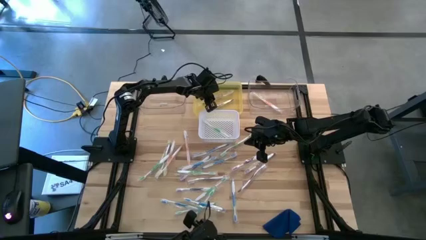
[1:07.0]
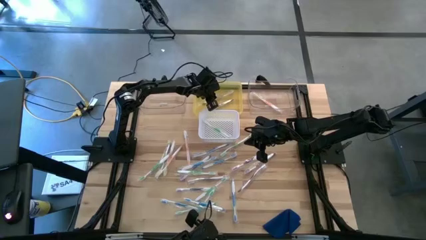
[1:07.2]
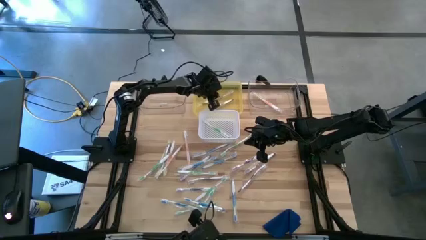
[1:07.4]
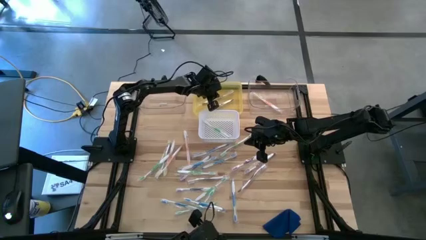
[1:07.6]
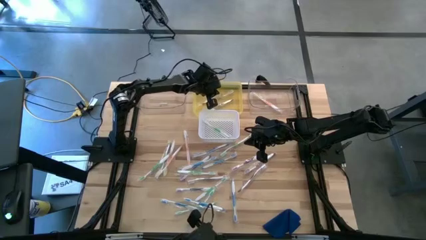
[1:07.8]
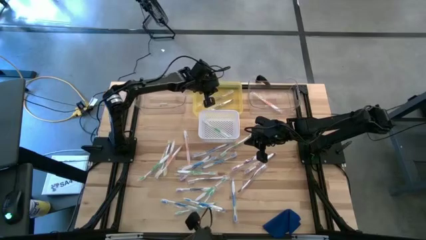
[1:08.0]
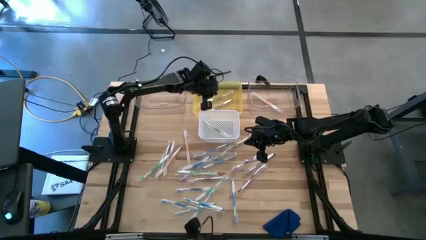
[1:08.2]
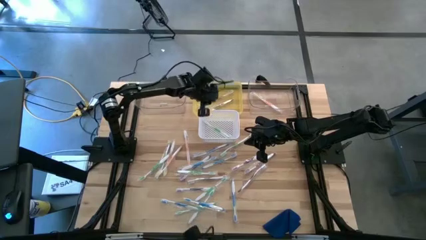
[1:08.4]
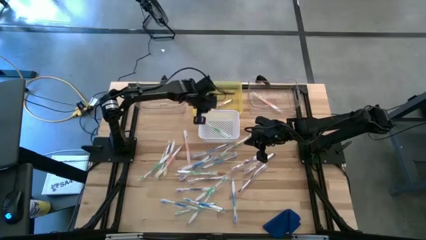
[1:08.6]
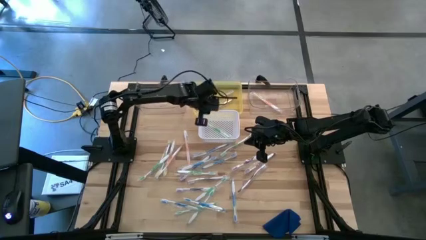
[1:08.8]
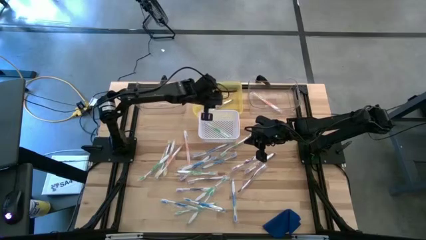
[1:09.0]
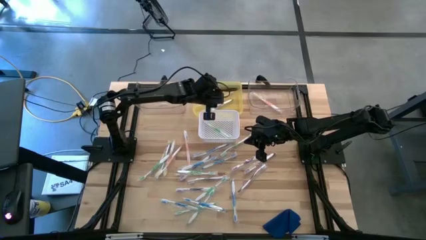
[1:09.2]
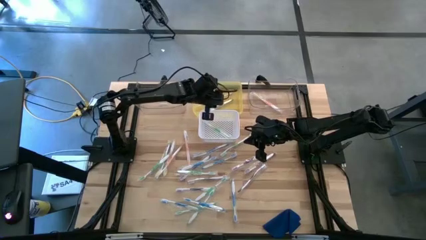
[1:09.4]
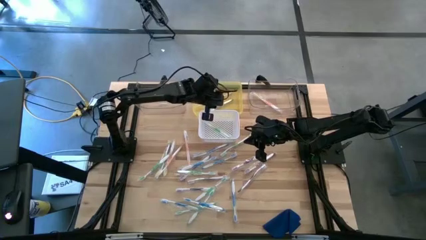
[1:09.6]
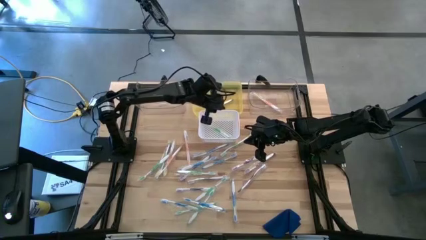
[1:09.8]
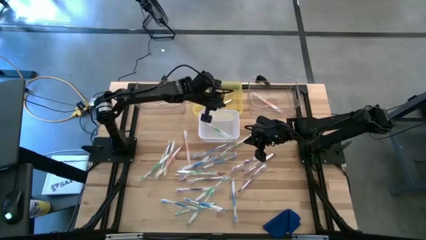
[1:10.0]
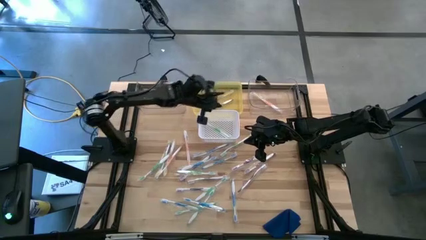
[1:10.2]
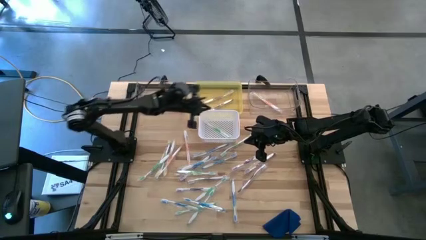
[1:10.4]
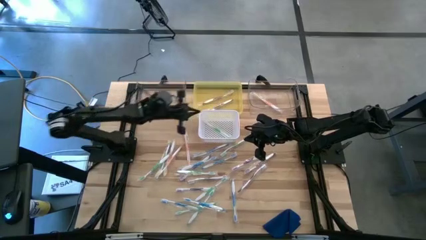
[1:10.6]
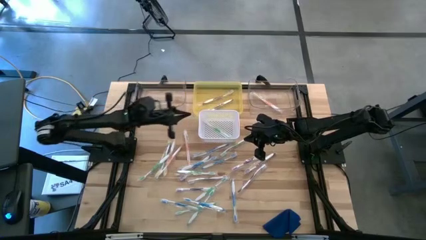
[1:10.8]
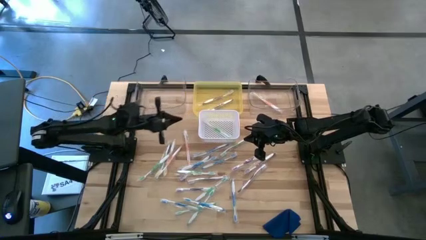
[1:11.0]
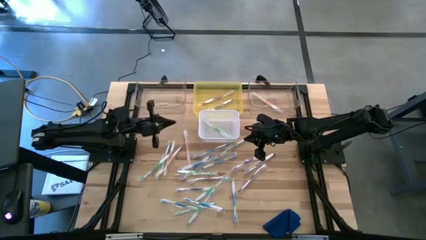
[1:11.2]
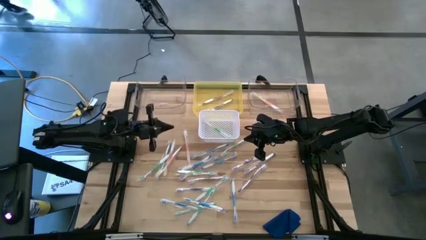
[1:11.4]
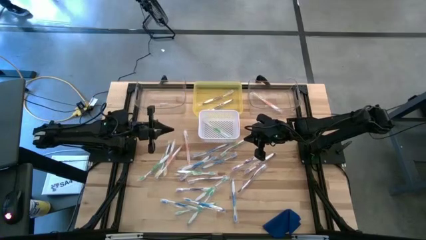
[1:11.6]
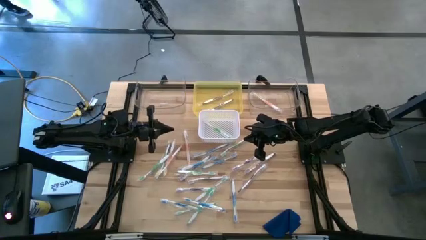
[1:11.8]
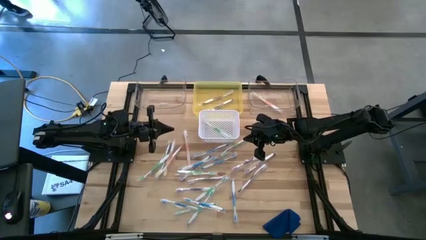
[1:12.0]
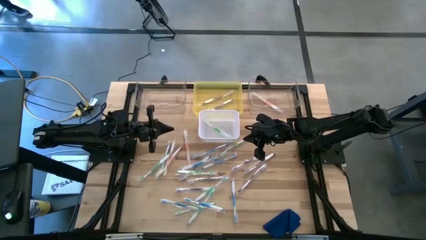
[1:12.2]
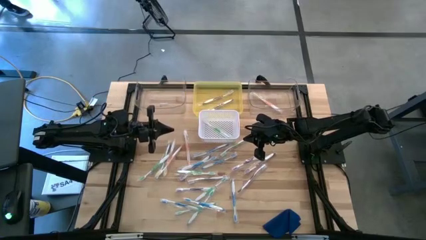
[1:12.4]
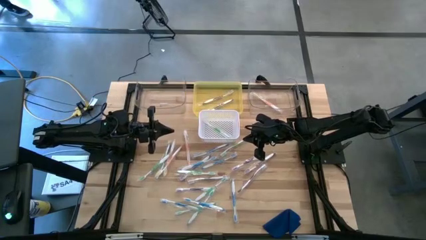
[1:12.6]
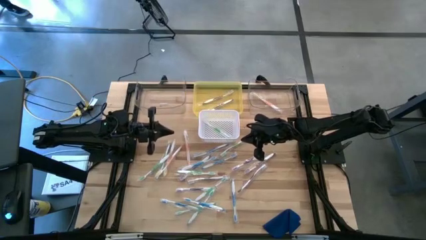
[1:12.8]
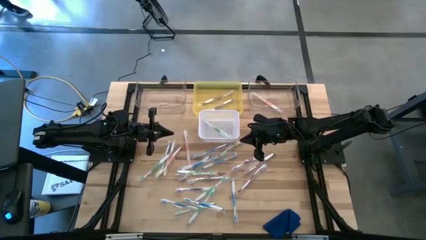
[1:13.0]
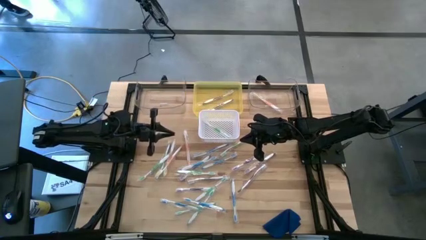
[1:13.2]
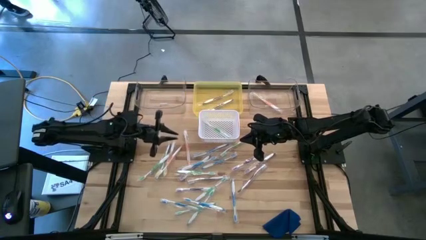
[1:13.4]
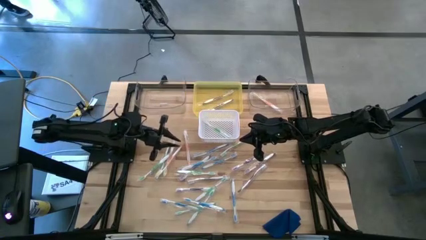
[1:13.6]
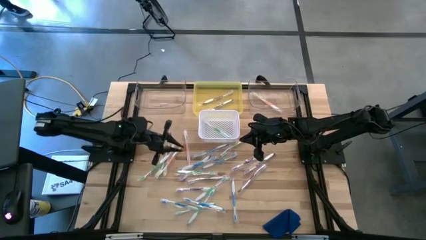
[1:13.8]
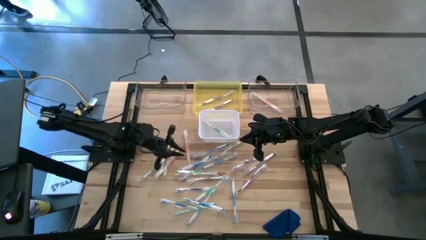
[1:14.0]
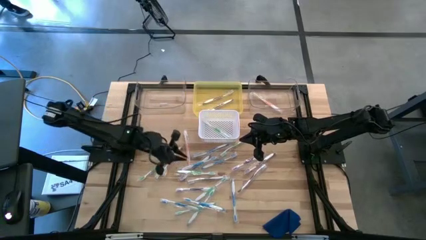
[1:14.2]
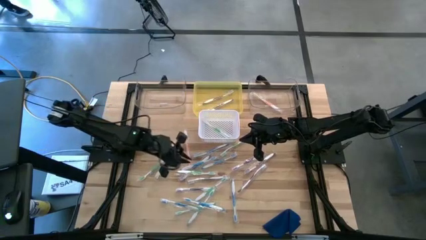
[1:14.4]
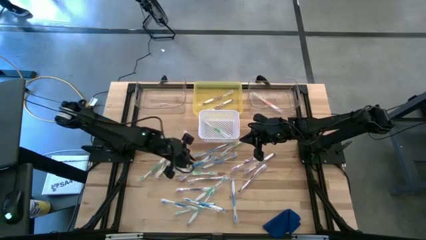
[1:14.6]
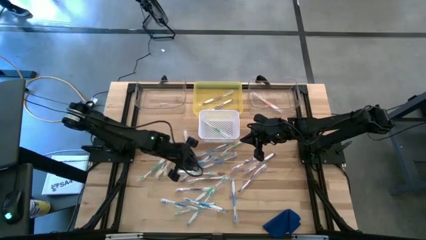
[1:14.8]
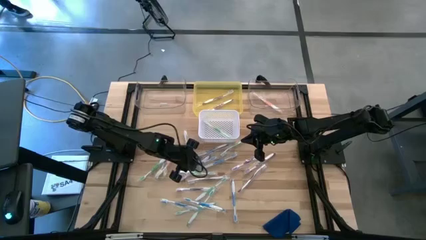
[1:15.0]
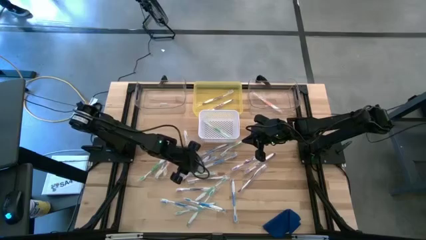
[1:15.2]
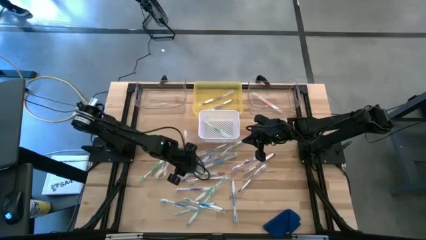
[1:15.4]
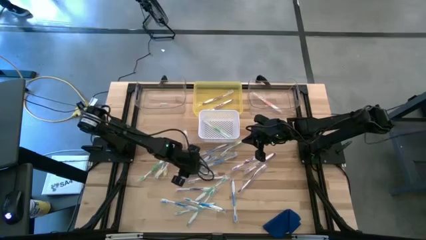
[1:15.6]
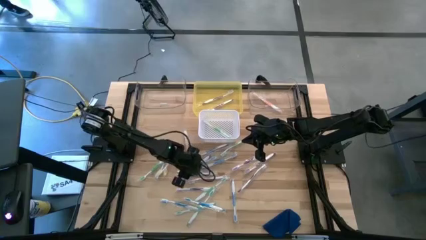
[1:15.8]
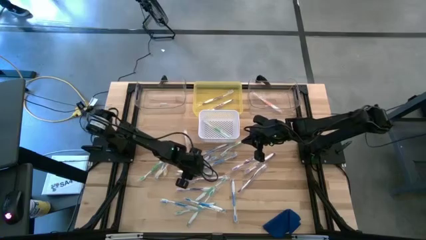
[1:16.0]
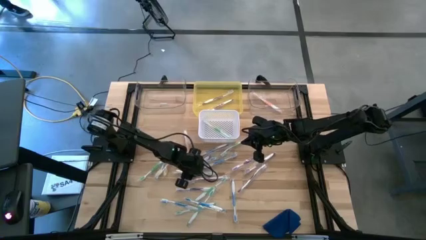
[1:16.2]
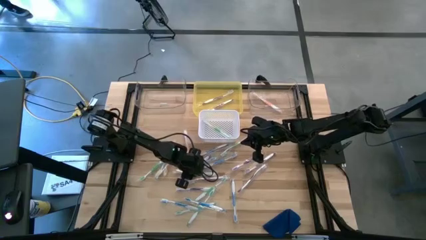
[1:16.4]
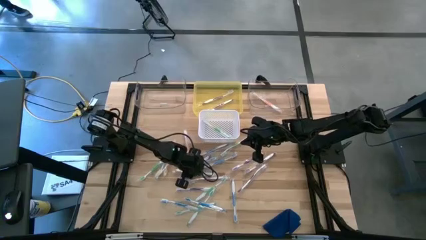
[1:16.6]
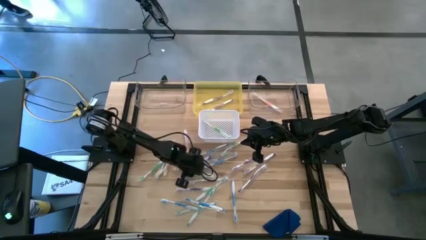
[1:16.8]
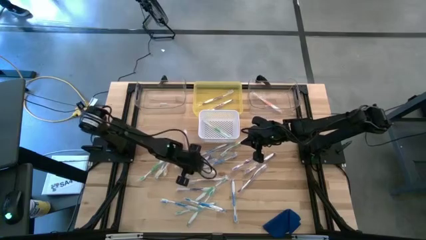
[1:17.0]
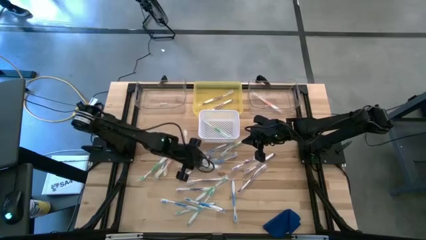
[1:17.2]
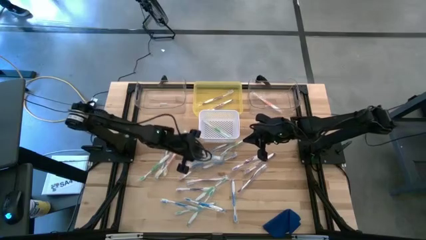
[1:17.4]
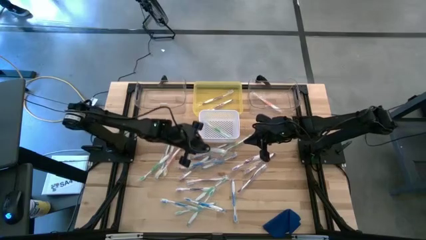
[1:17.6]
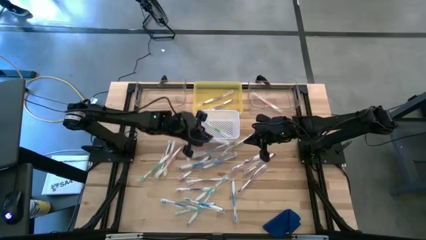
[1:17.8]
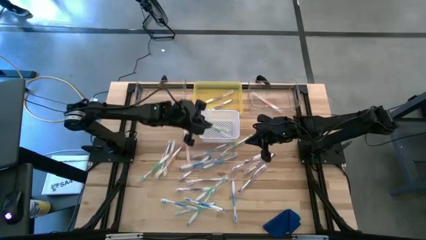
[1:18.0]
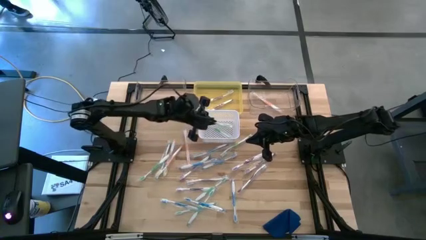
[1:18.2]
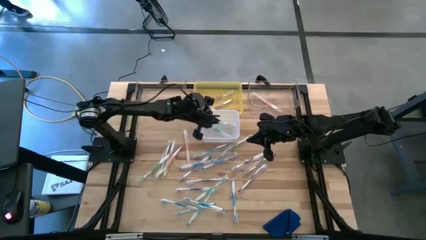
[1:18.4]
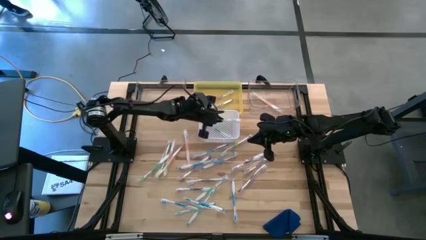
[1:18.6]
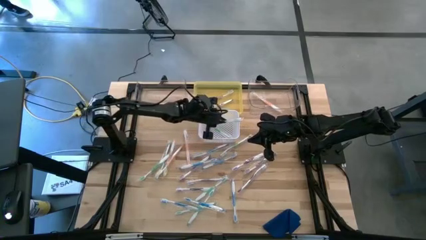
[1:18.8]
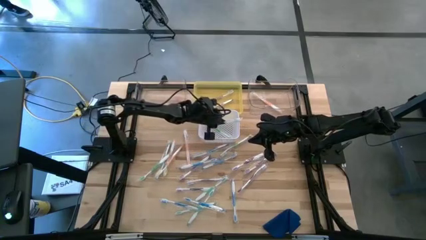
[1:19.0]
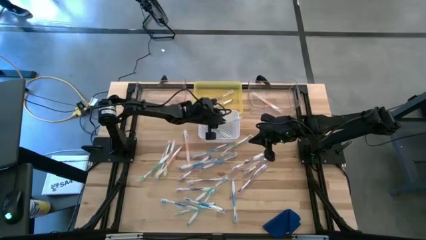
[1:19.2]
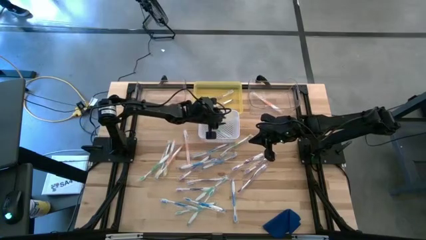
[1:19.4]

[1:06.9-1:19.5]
Task: Pick & Place Toothbrushes
Put the green toothbrush into the white bin
